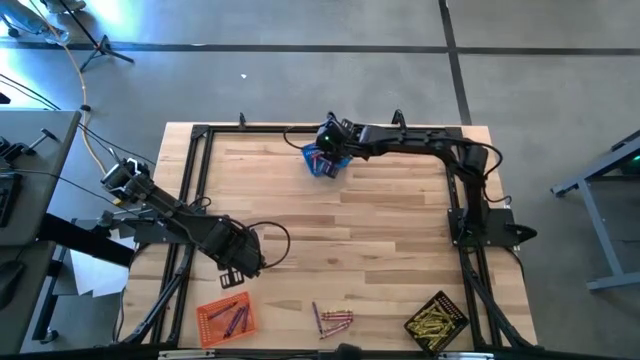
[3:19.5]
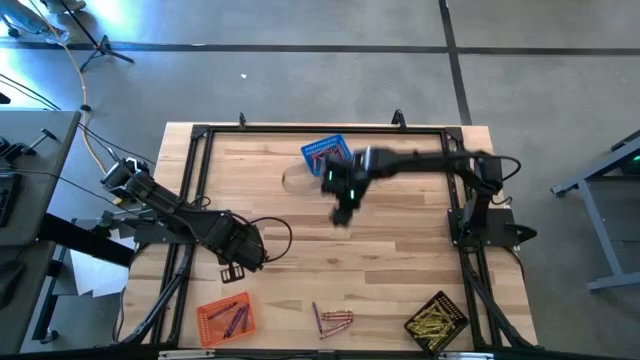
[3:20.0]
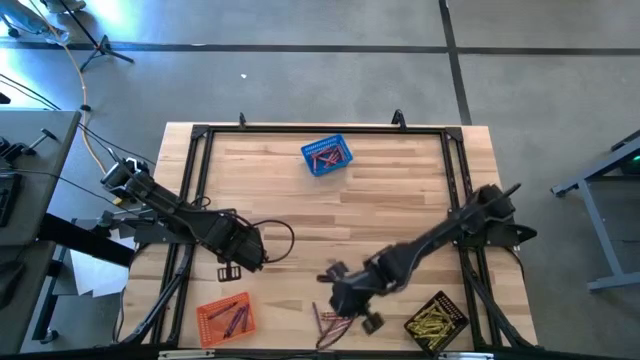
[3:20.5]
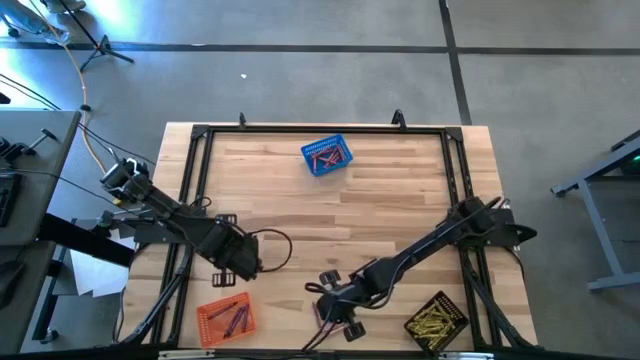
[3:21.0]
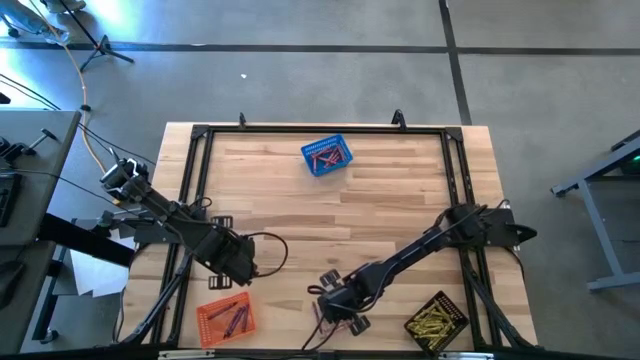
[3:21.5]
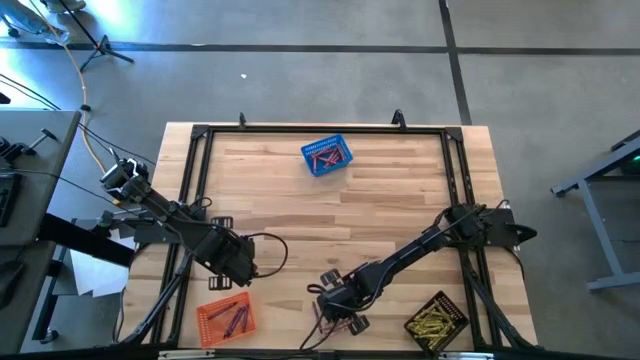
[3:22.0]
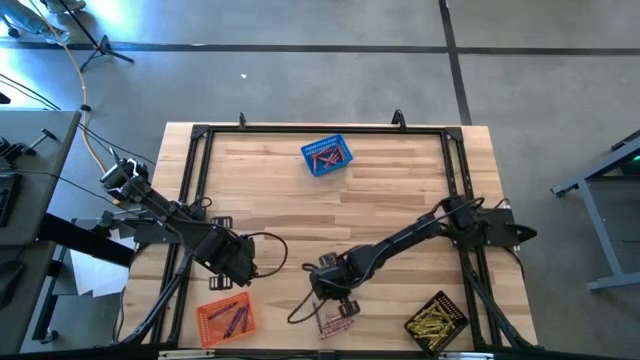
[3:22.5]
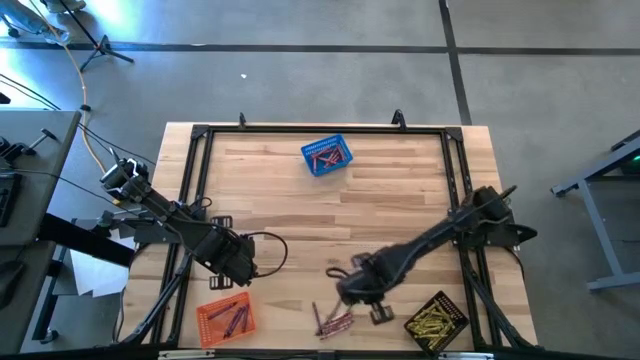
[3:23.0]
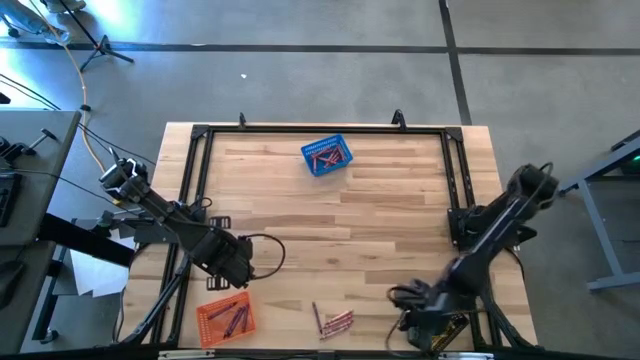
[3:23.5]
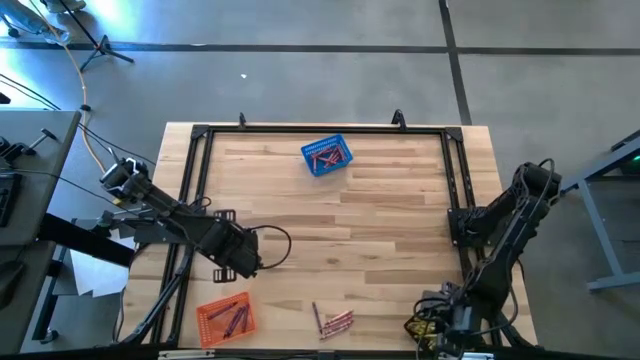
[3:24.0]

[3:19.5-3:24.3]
Task: Sort crayons
Put the yellow crayon into the black bin

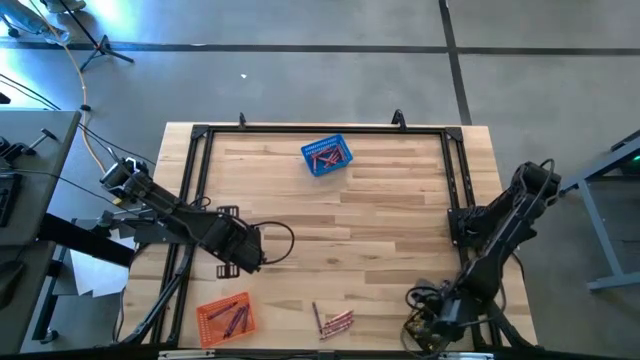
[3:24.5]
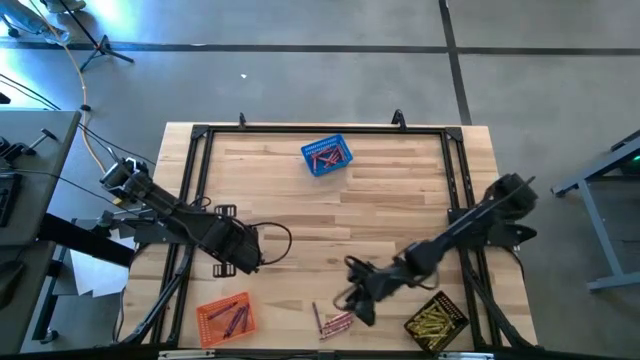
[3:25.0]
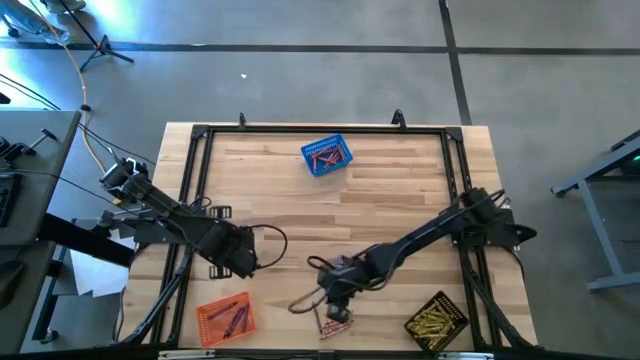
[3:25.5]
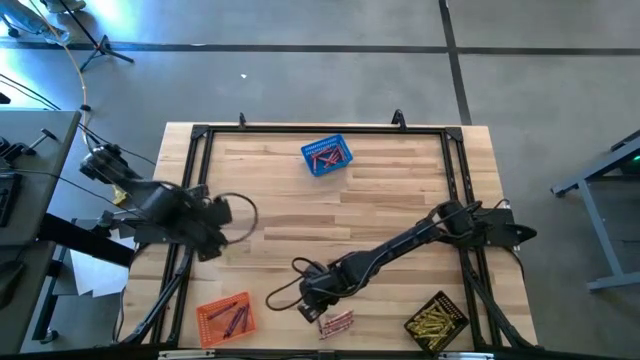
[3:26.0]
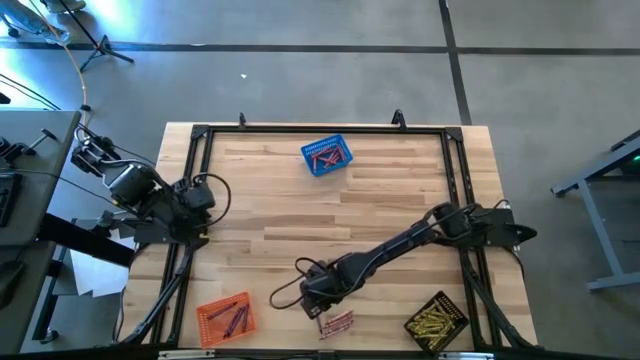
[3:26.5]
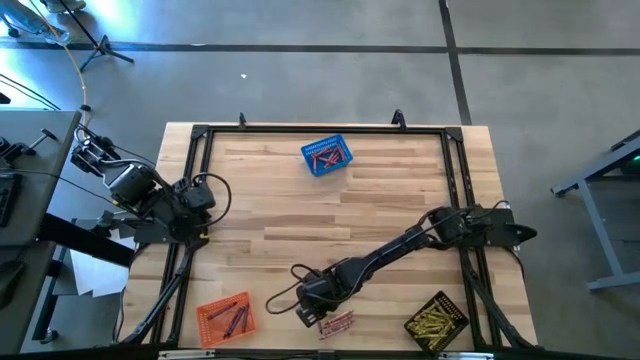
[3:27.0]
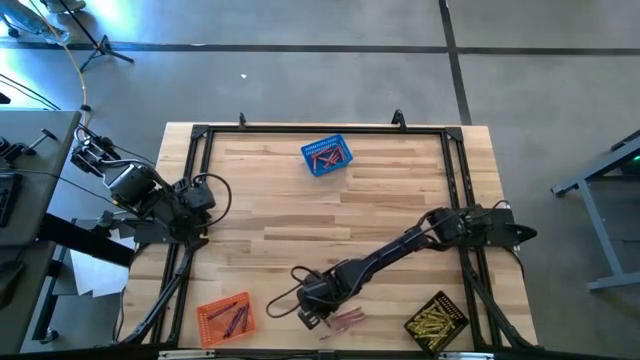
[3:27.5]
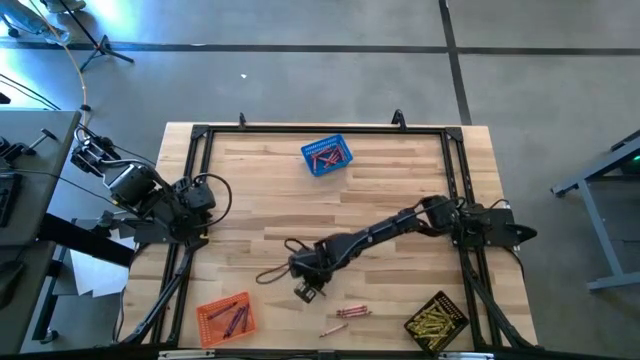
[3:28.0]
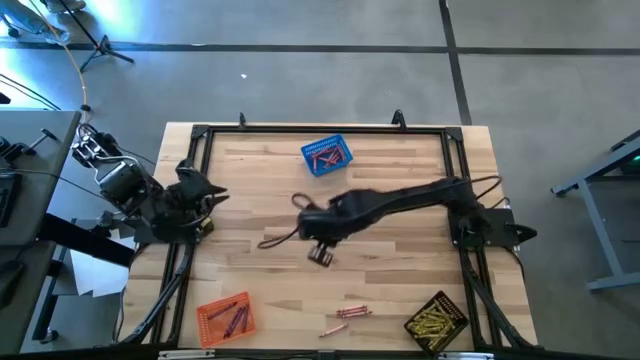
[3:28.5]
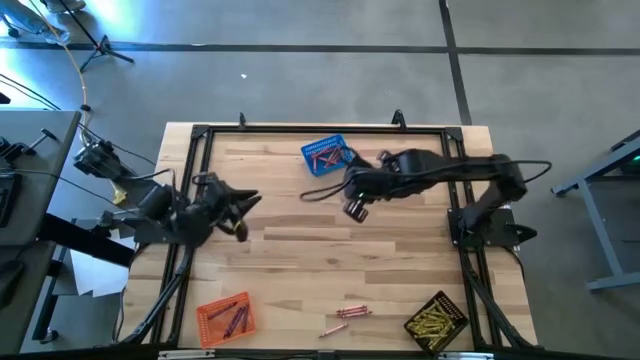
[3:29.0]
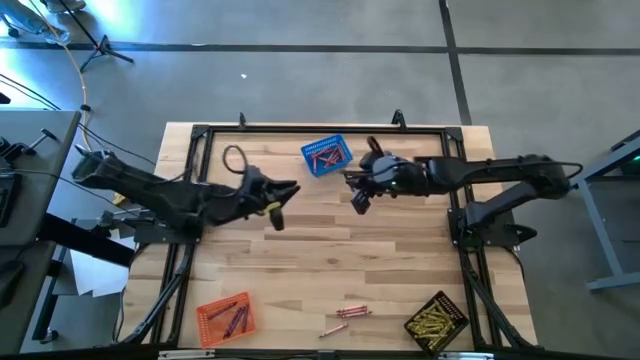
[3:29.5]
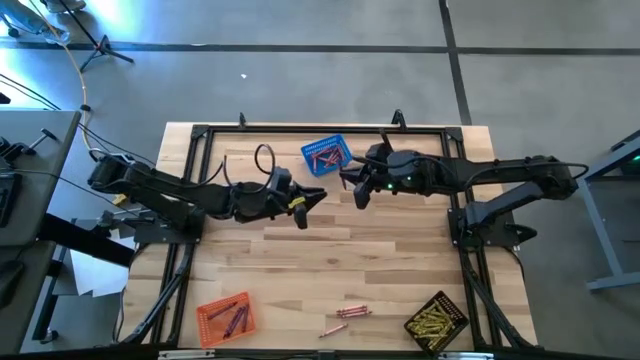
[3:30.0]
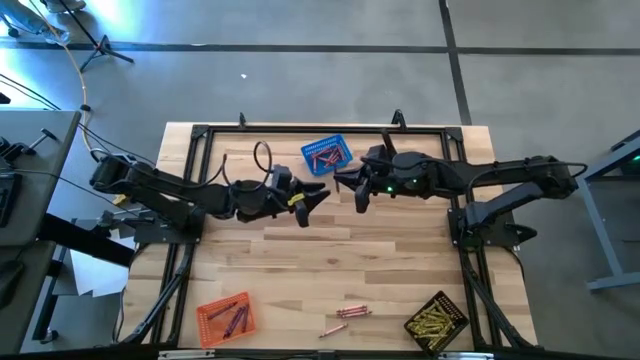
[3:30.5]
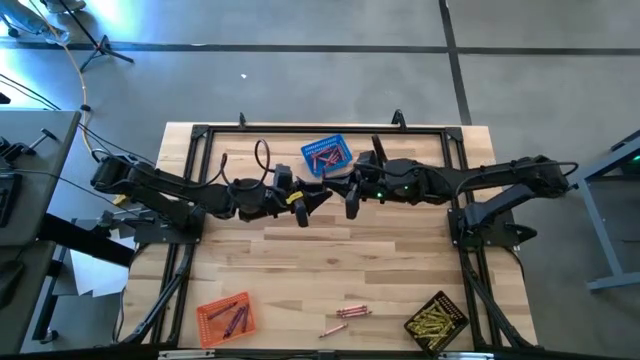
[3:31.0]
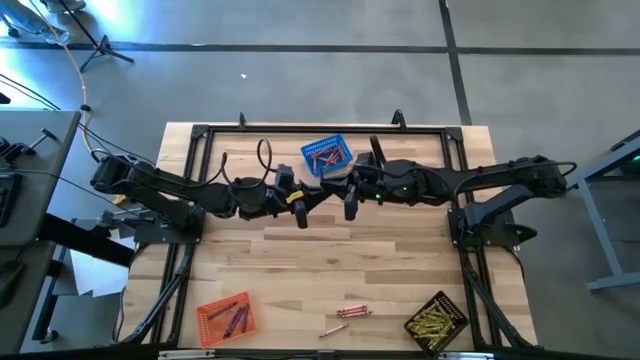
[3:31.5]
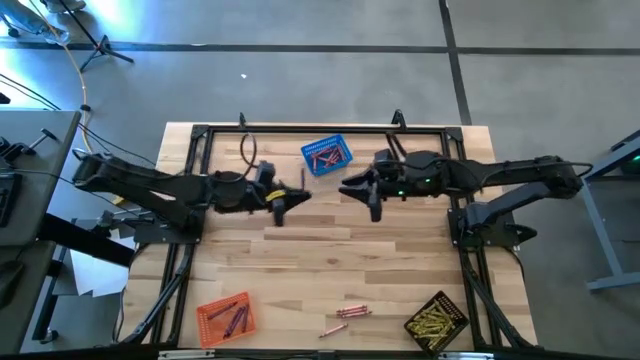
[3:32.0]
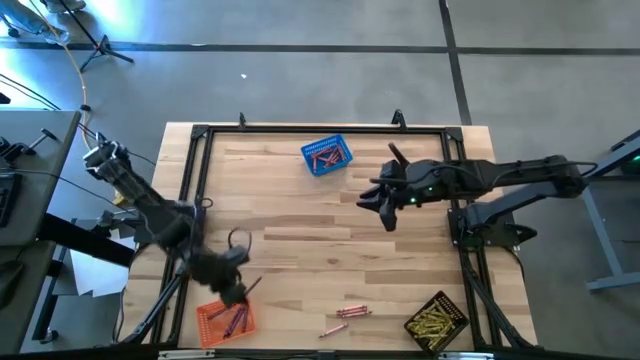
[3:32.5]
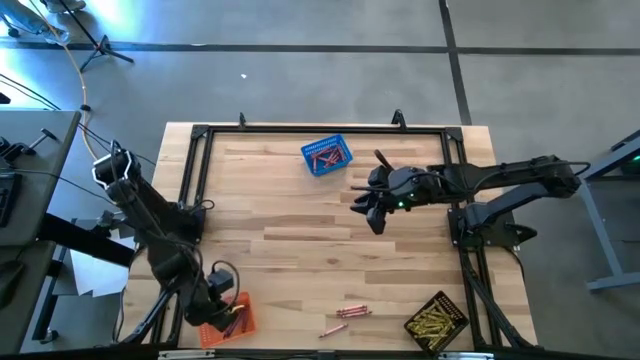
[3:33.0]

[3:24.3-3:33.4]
Put the purple crayon into the orange bin

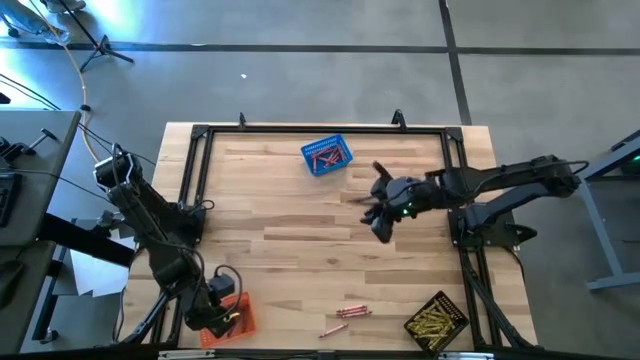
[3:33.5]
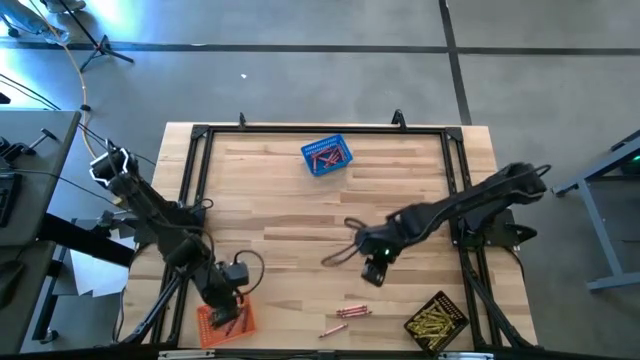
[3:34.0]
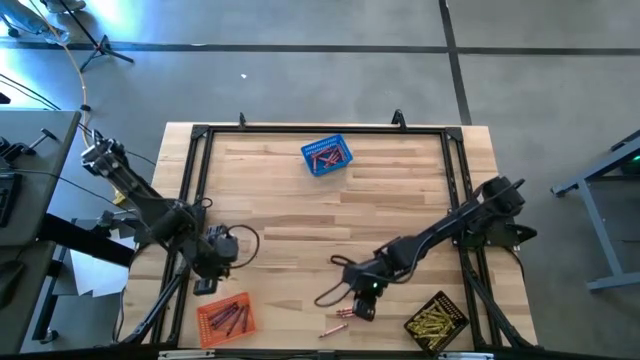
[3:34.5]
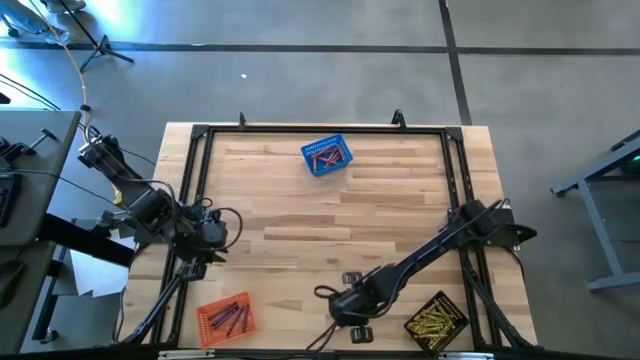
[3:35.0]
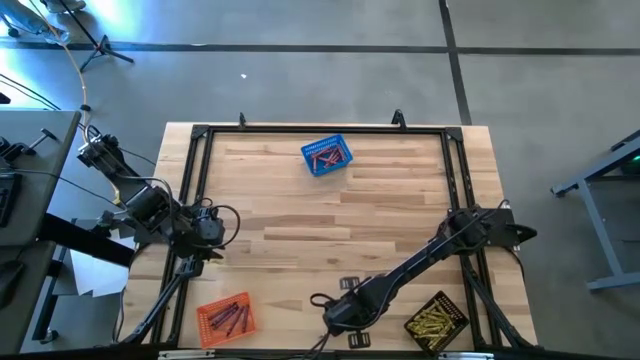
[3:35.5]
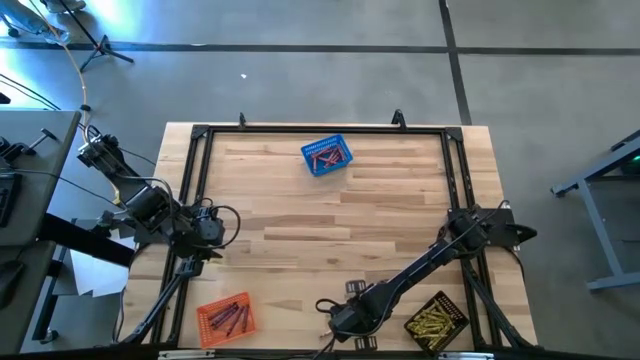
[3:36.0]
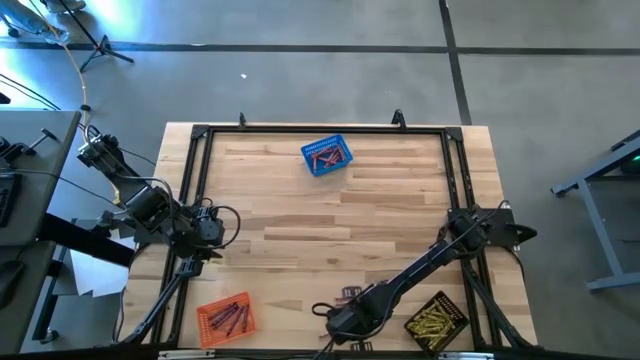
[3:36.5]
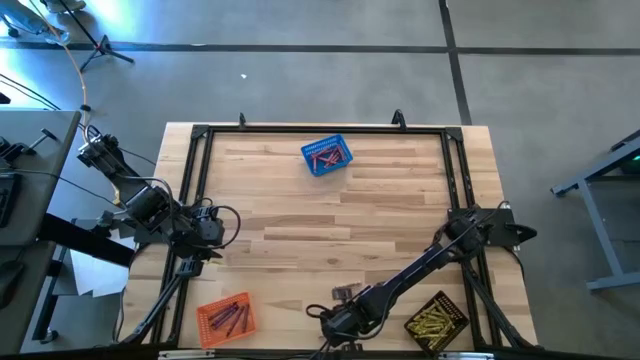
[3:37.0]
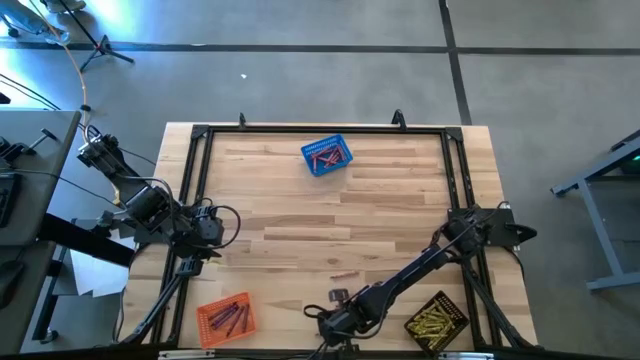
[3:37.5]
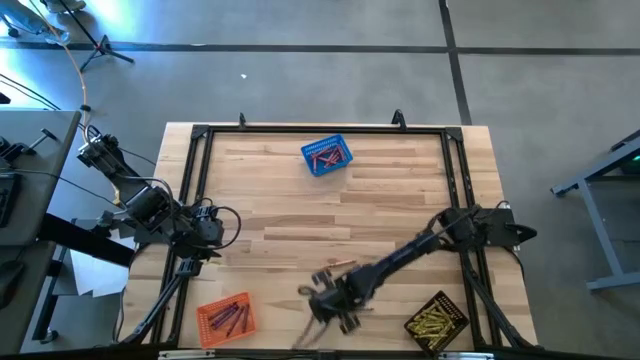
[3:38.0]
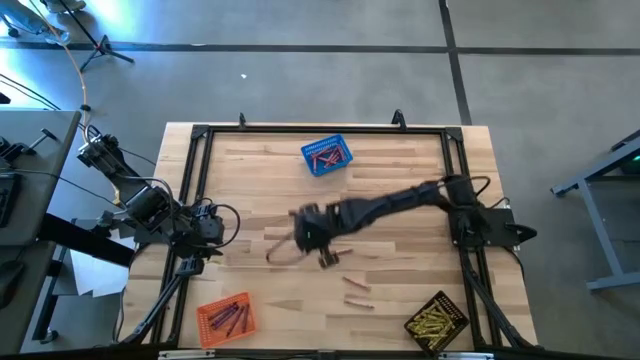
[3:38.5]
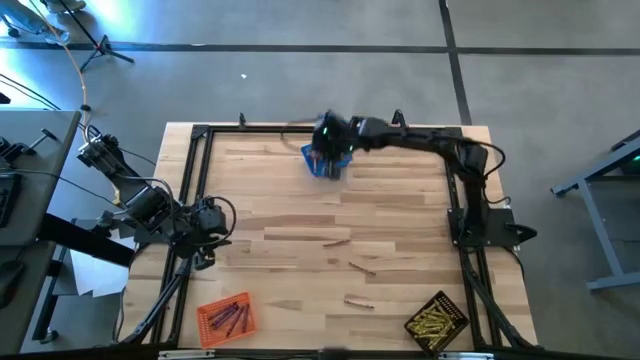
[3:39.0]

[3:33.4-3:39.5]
Put the red crayon into the blue bin

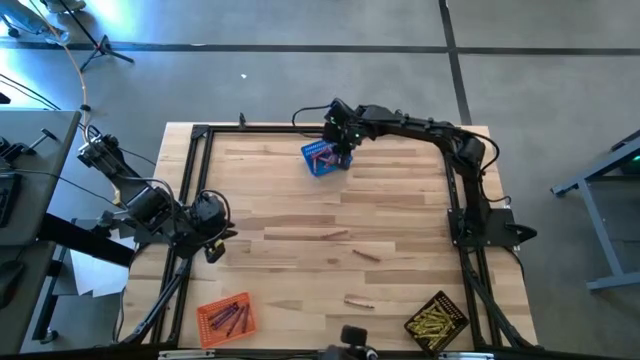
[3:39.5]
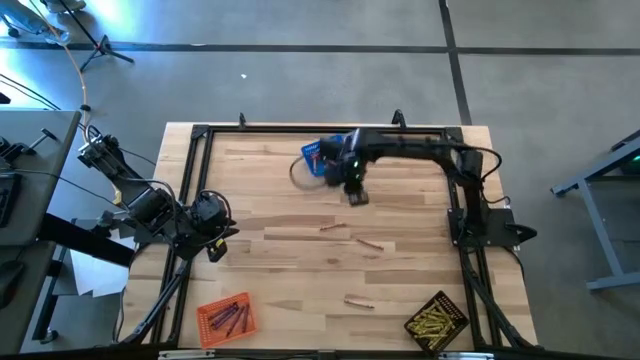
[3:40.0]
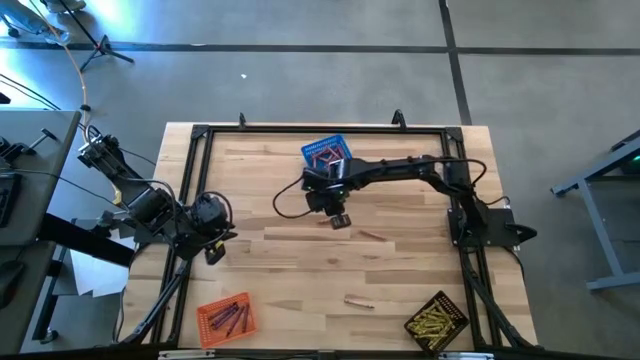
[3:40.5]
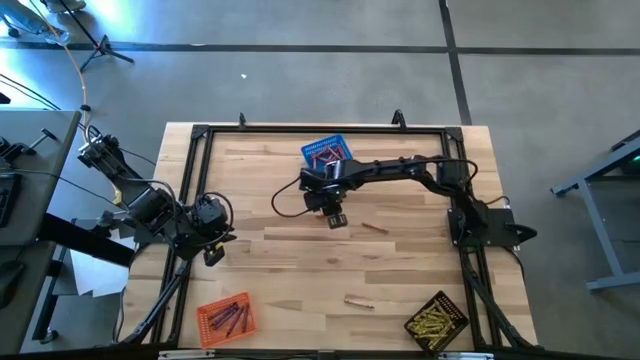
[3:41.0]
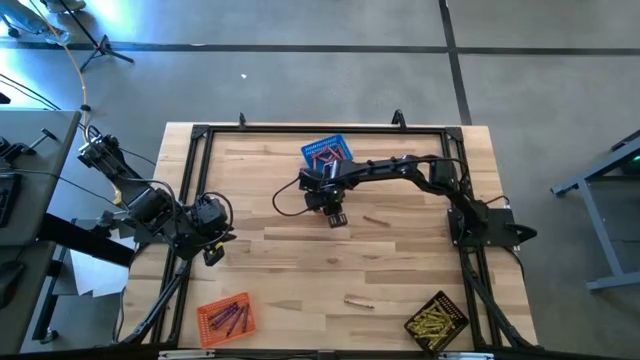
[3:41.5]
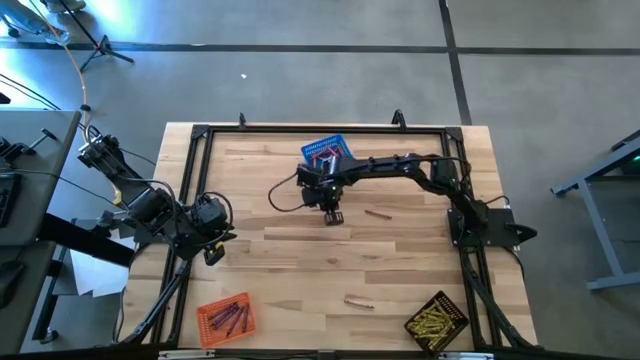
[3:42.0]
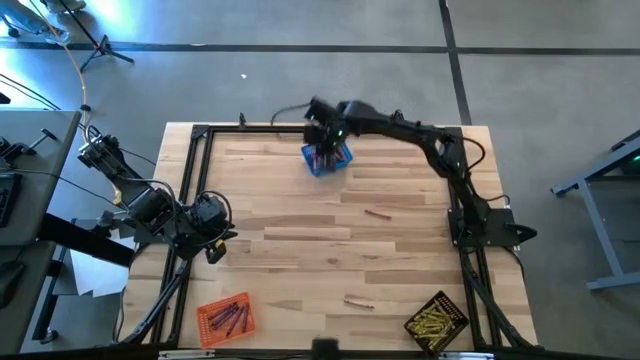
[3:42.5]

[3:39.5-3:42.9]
Put the red crayon into the blue bin
